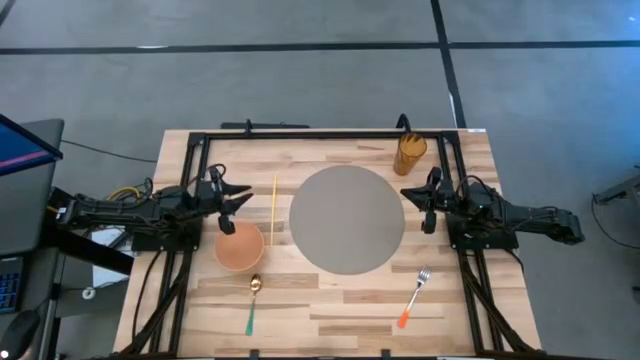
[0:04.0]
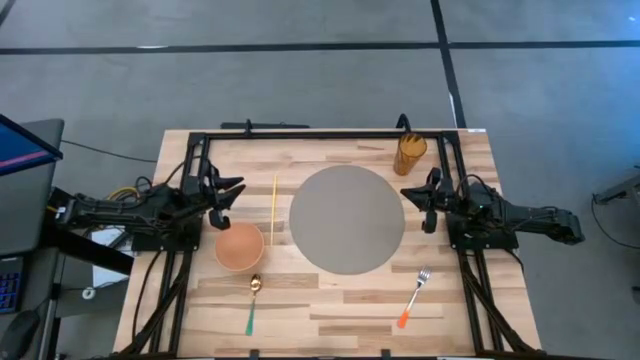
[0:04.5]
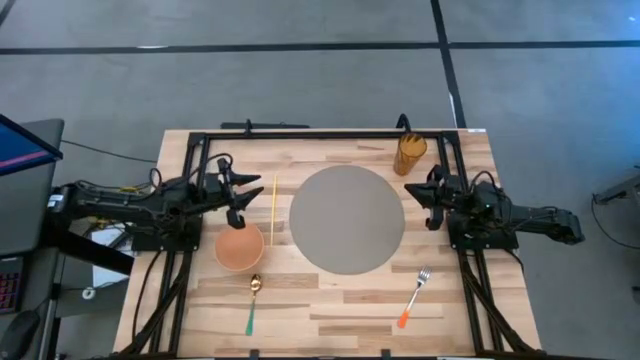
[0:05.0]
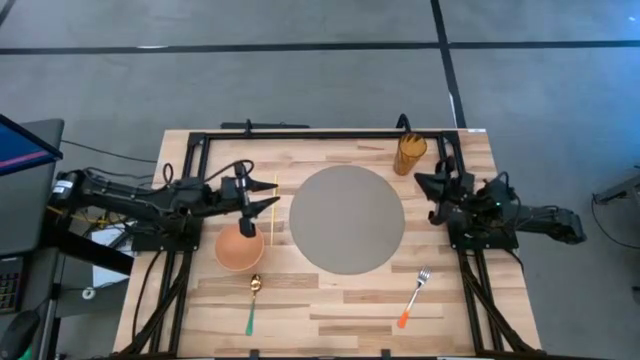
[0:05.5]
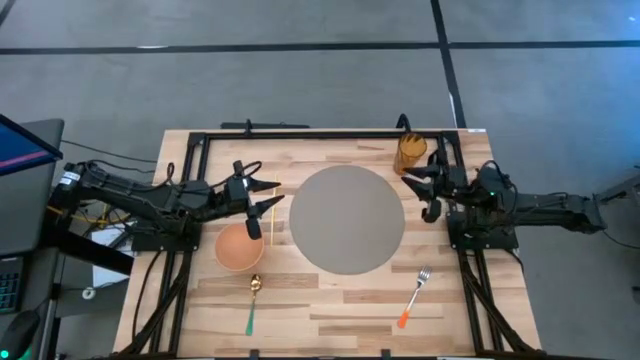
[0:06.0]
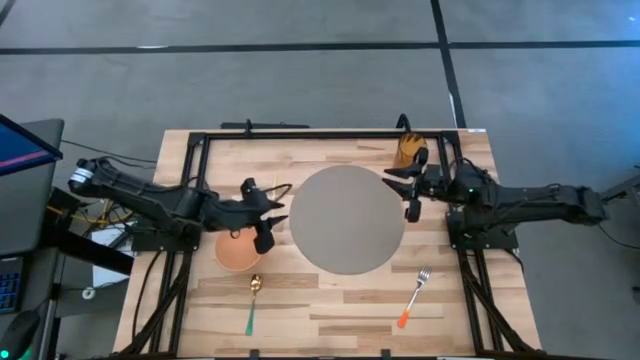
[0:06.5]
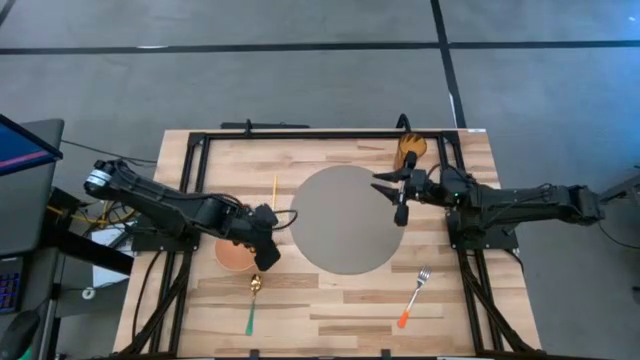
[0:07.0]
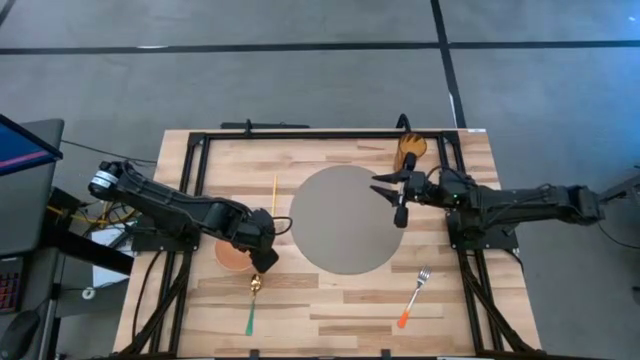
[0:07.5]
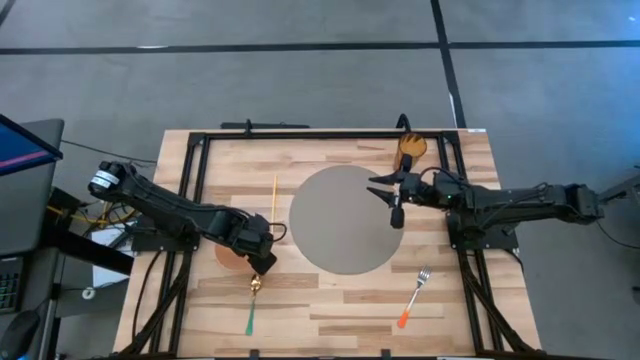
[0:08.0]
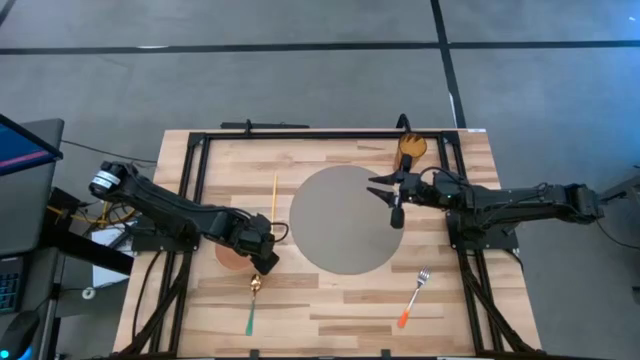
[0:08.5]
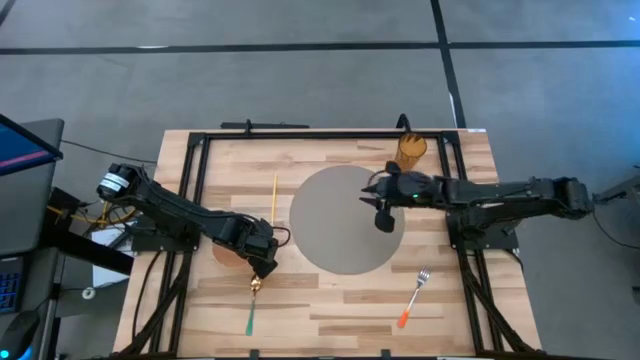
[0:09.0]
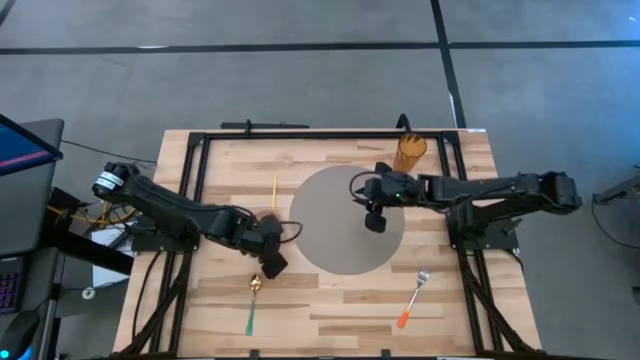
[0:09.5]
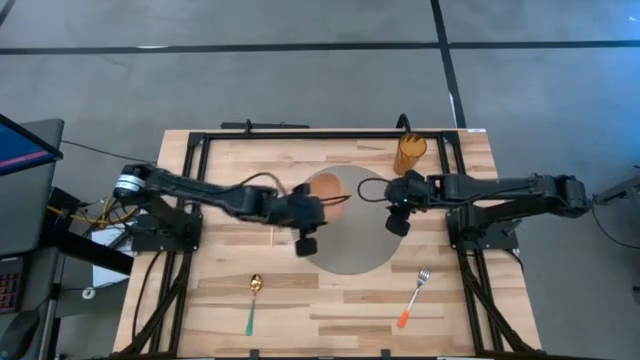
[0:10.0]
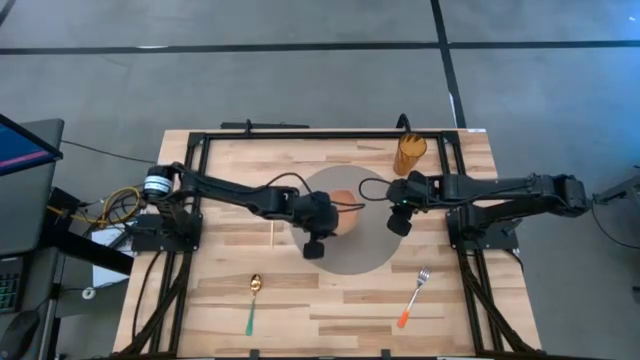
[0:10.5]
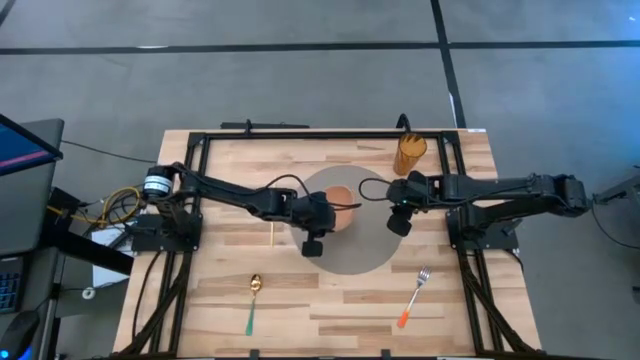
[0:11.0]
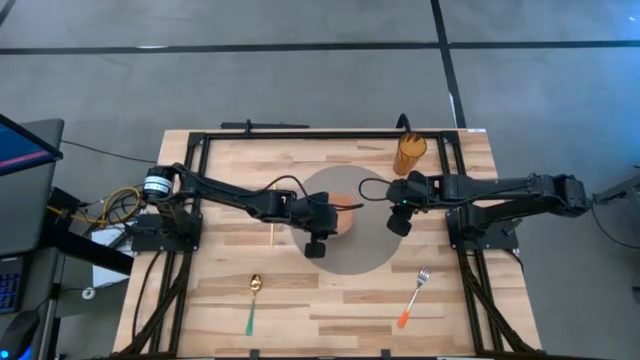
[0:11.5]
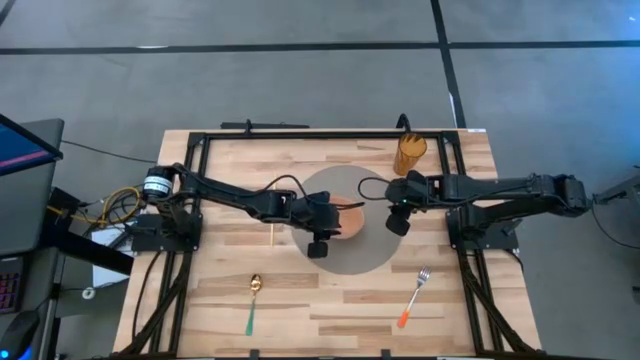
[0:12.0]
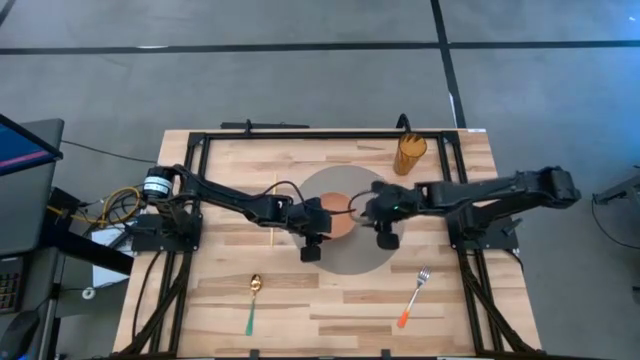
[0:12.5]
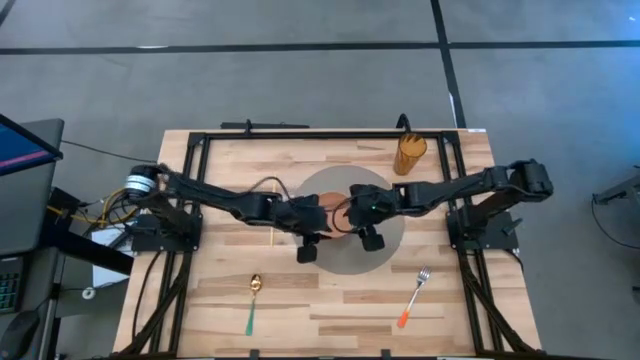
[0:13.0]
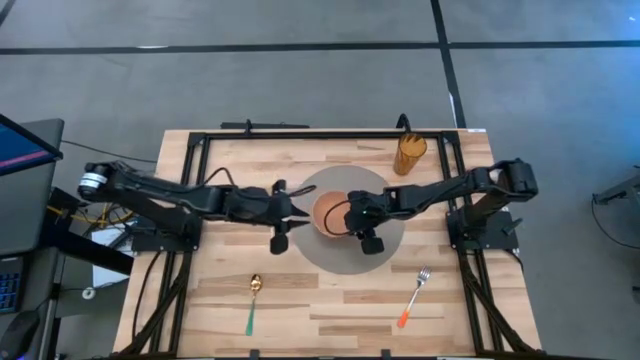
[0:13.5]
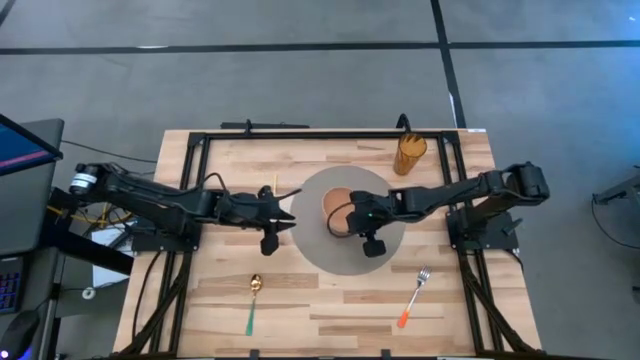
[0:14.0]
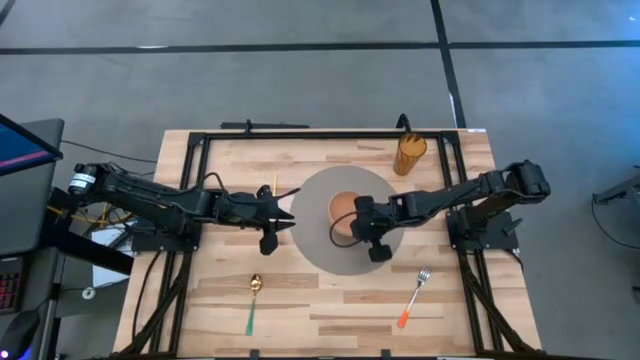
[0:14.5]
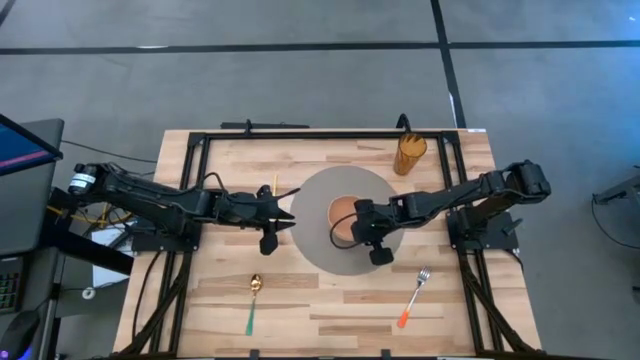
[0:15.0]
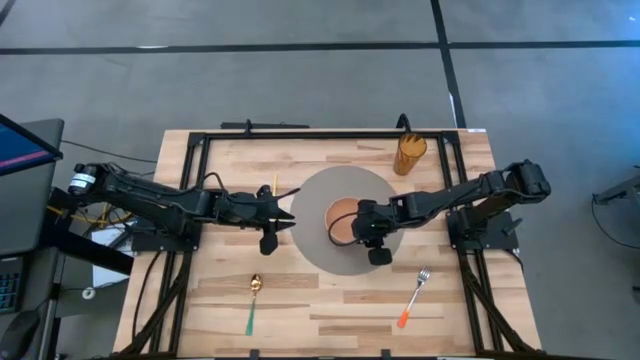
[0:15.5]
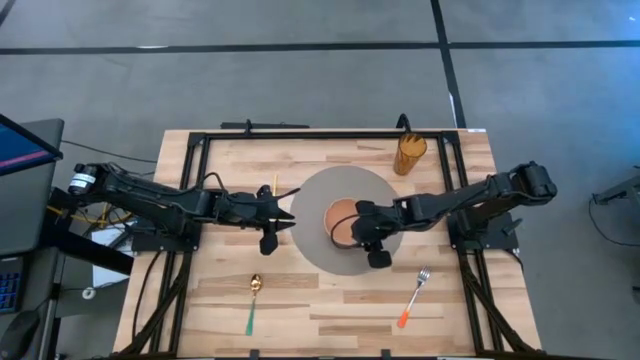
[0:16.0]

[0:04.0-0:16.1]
Task: Pick & Place Utensil
Put the orange bowl on the gray mat

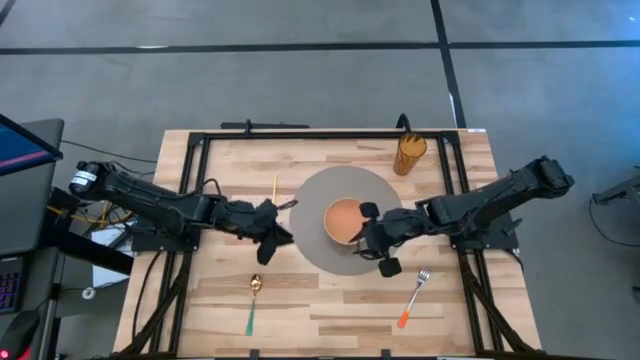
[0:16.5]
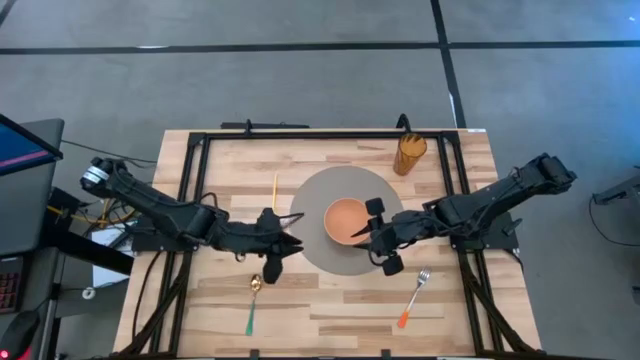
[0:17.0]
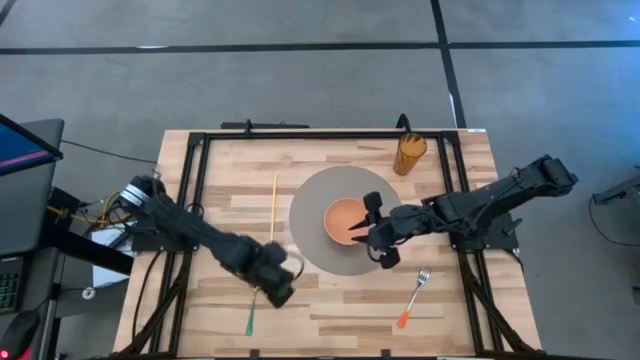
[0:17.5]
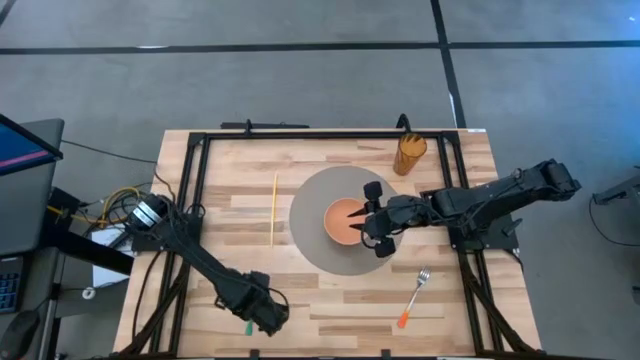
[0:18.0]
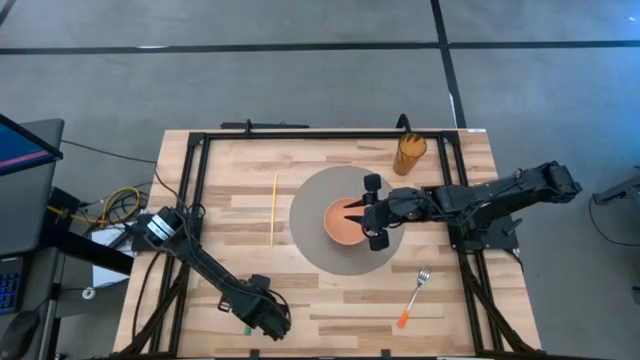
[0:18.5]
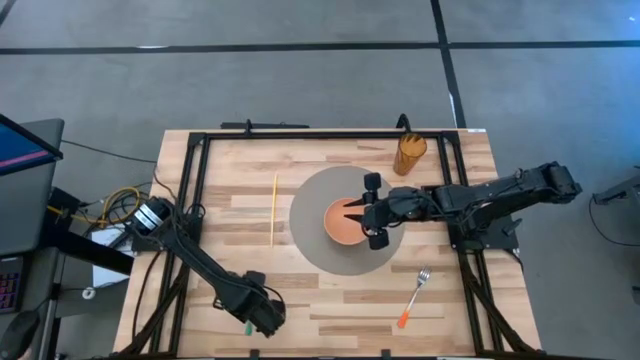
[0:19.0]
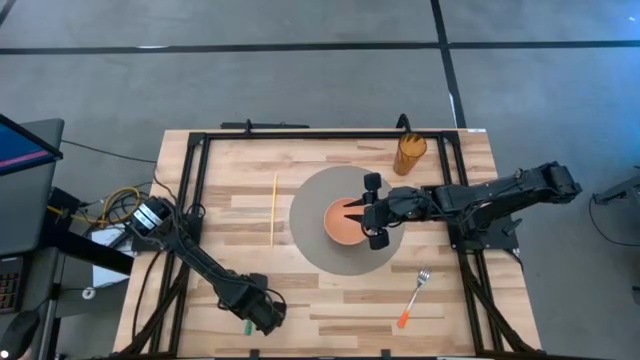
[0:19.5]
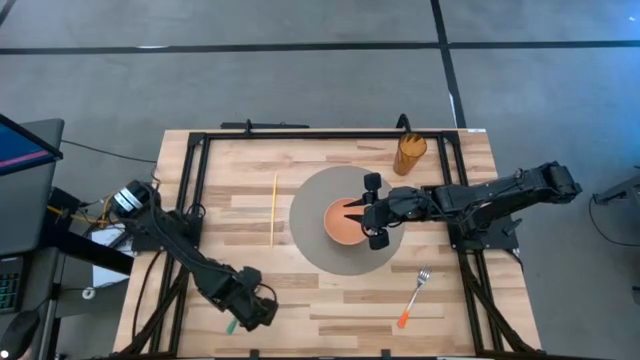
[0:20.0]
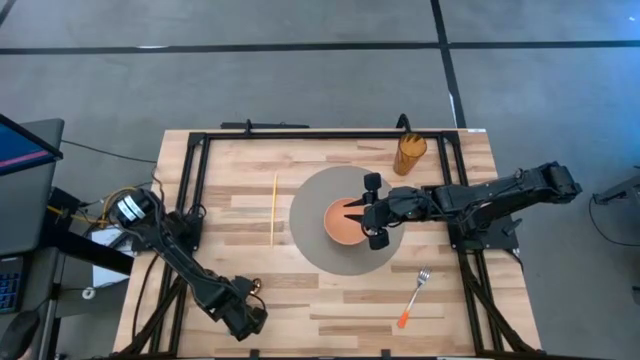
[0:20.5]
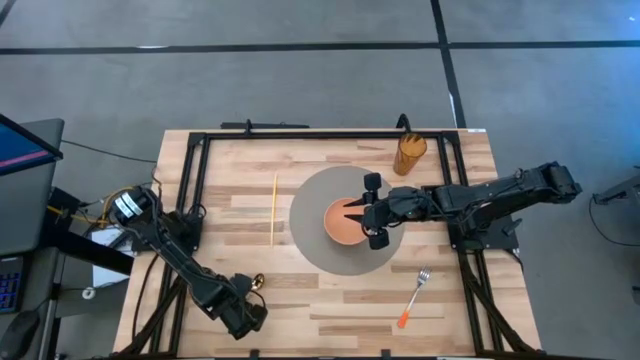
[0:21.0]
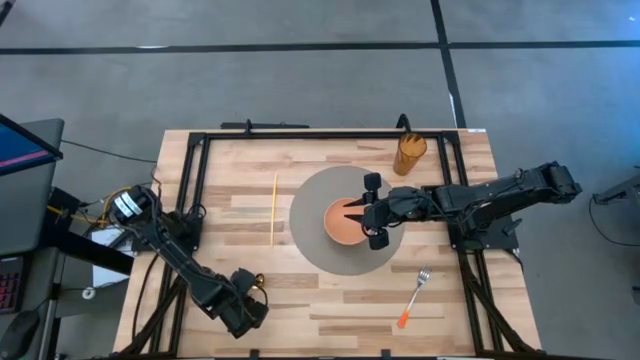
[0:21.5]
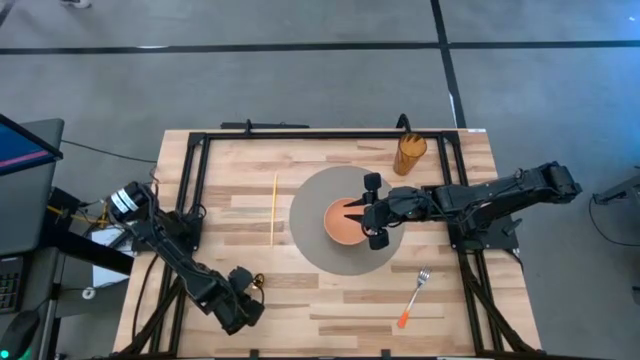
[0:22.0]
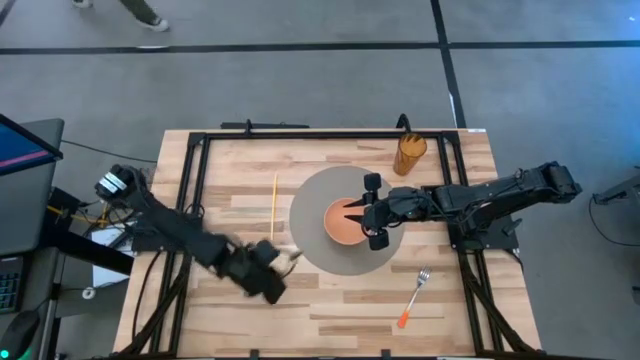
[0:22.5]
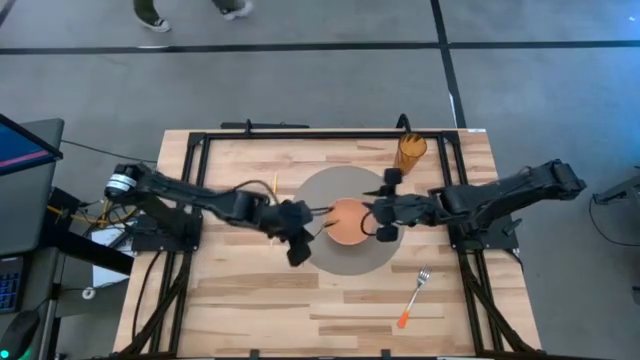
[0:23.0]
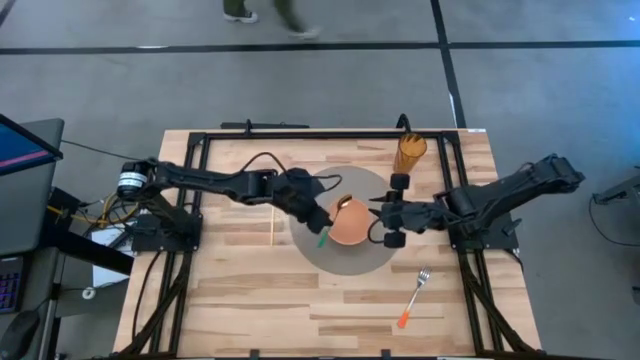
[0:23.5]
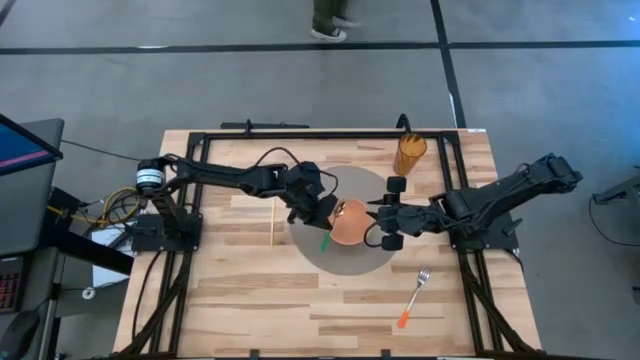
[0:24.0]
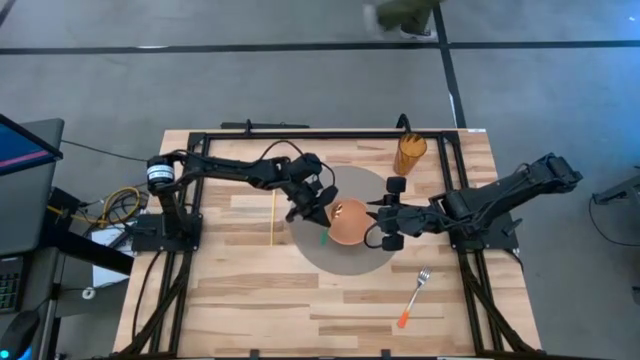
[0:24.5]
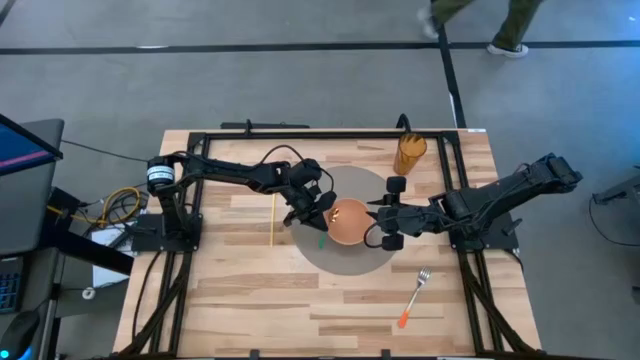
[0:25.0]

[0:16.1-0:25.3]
Put the green spoon into the orange bowl on the gray mat
